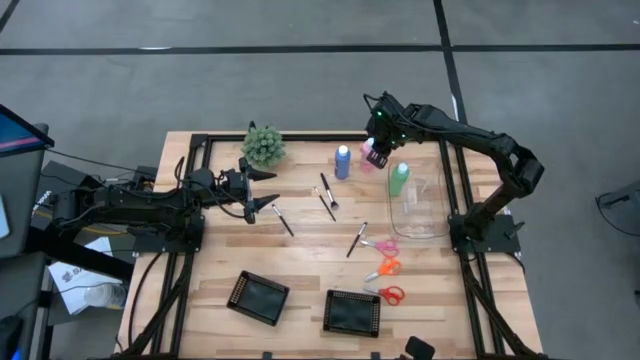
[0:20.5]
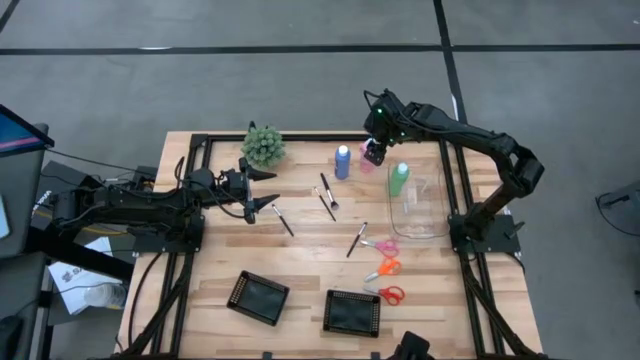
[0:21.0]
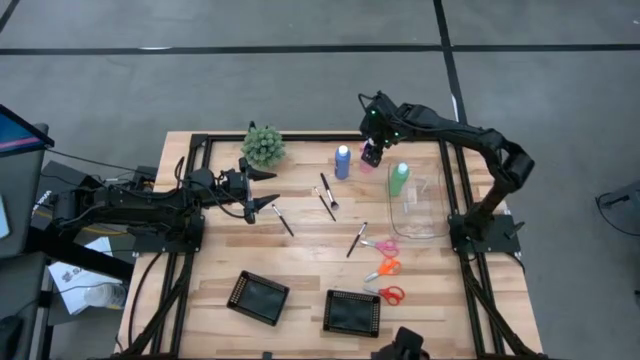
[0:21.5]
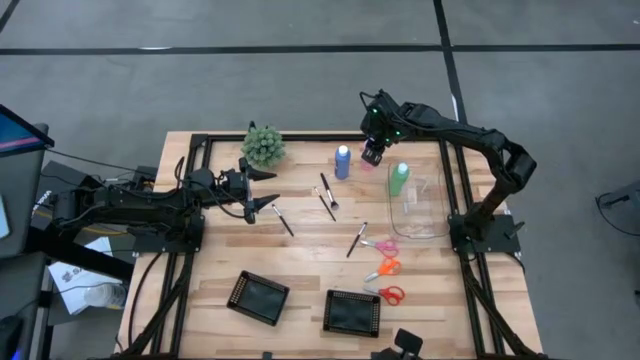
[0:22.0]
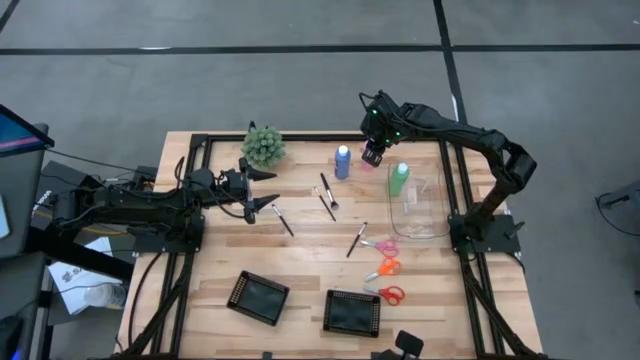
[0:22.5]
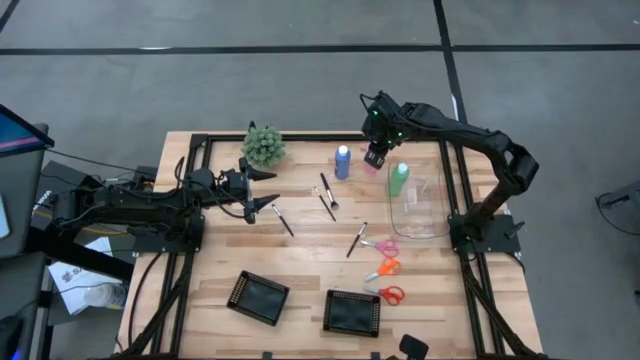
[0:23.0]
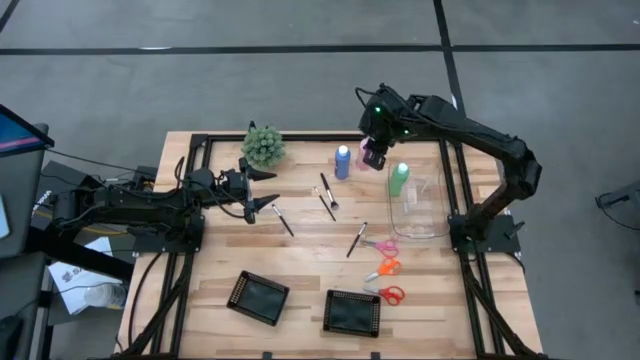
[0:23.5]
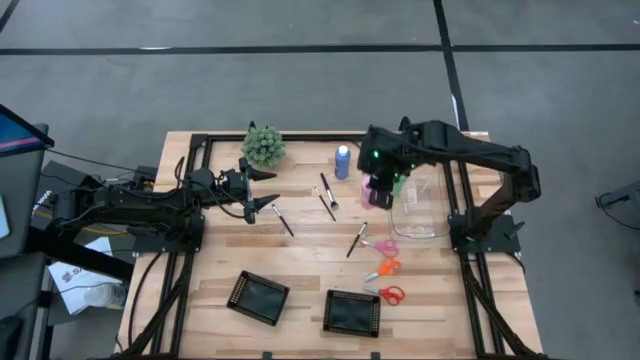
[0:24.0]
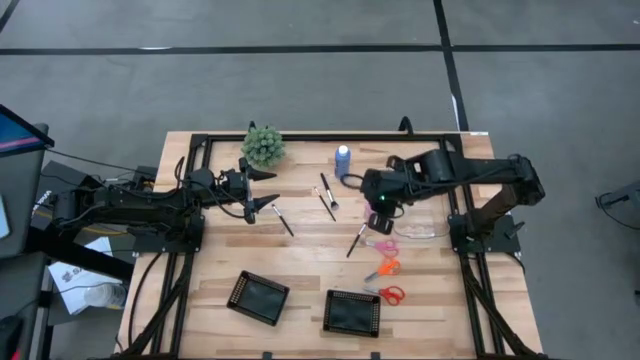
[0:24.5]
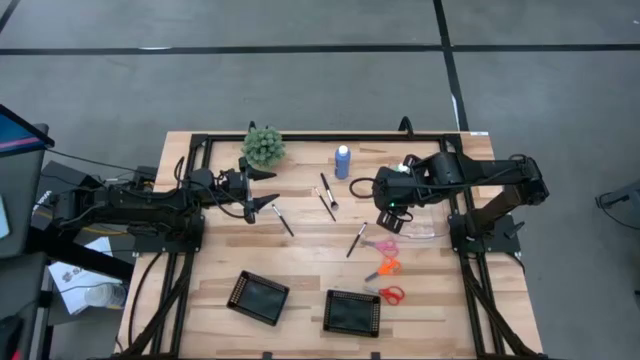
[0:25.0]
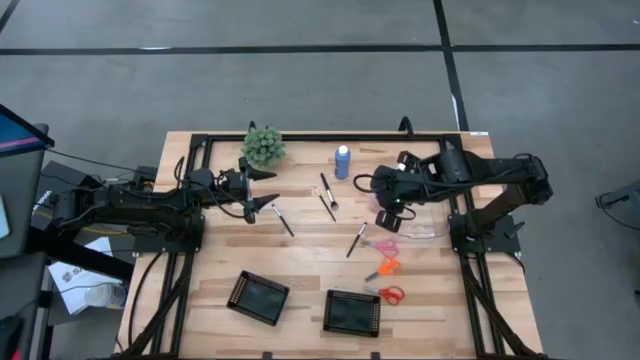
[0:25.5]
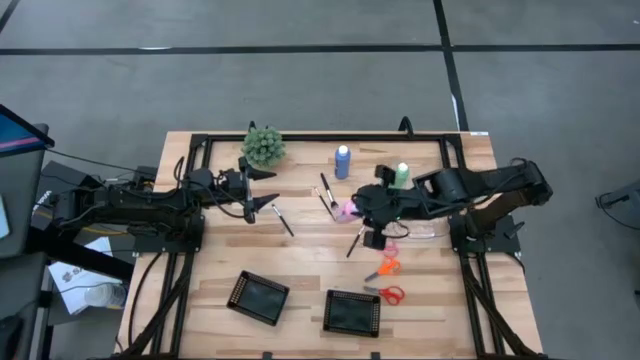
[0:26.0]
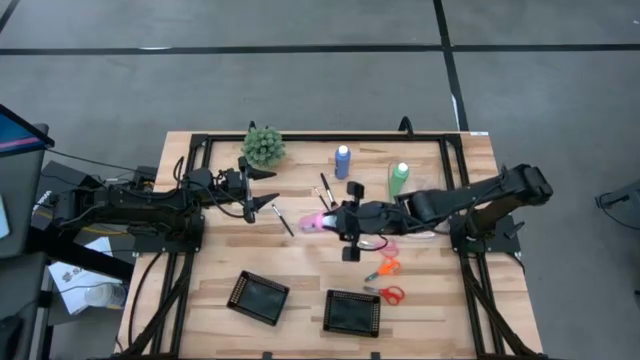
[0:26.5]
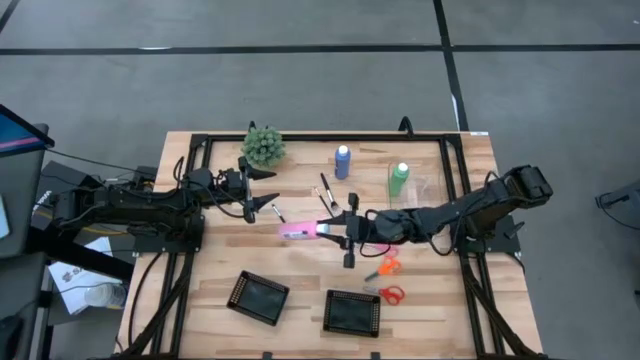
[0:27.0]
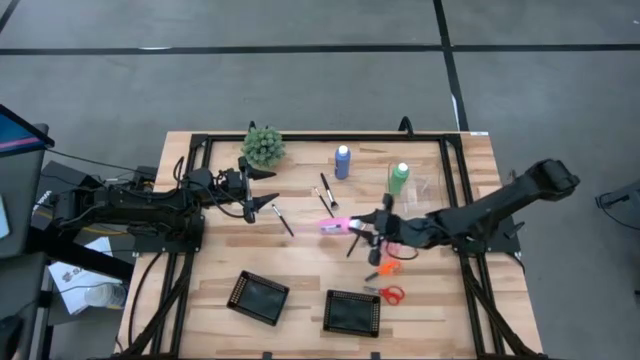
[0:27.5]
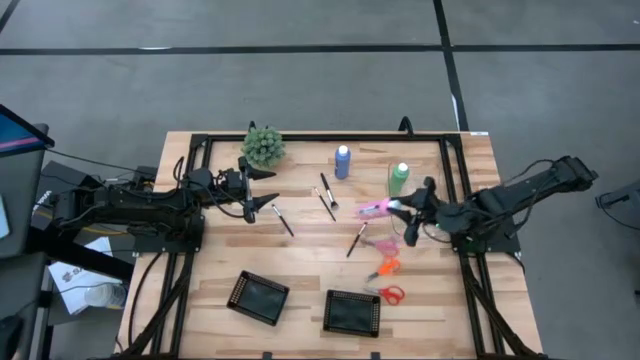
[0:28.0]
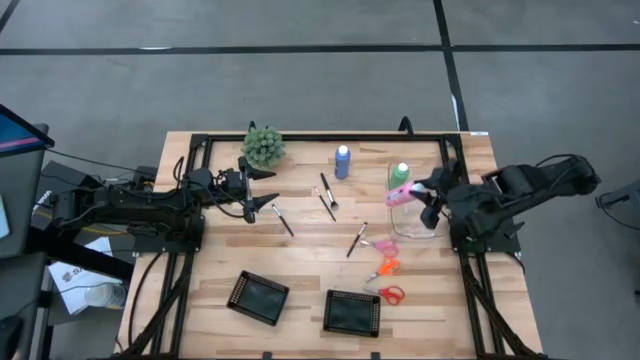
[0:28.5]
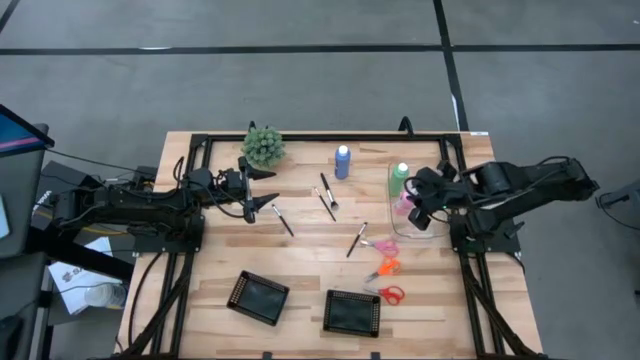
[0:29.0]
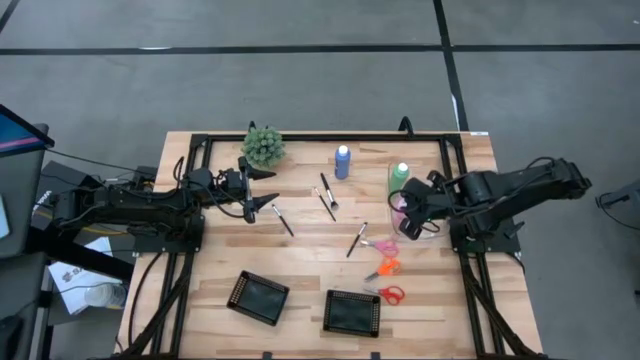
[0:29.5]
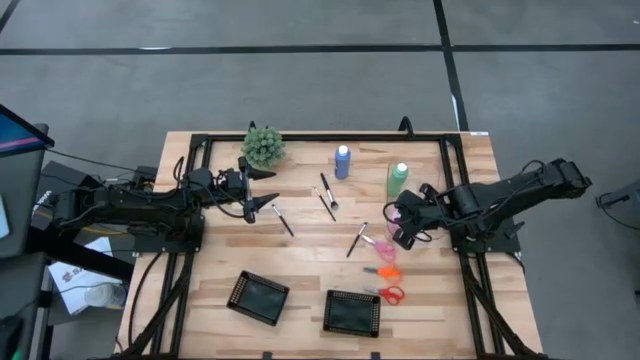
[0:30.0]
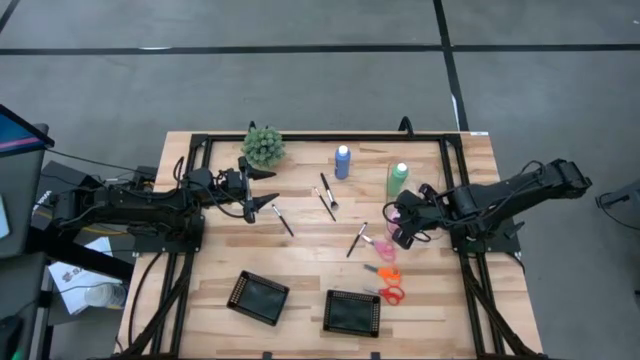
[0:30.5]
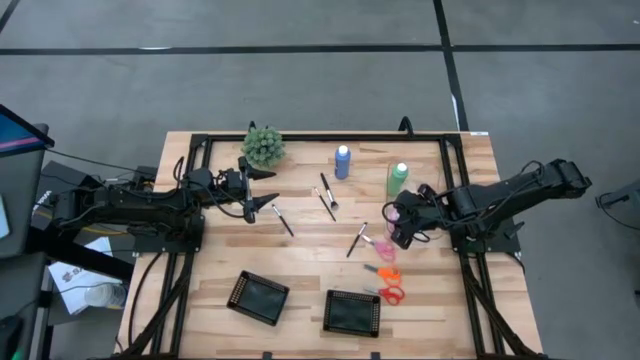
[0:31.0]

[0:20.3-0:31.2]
Task: Pick & Place Paint Supplies
Put the pink paint bottle into the transparent bin

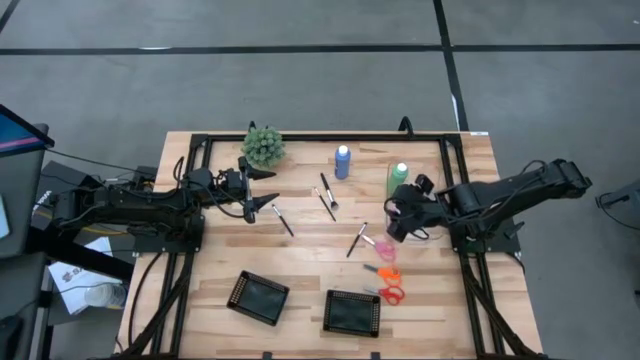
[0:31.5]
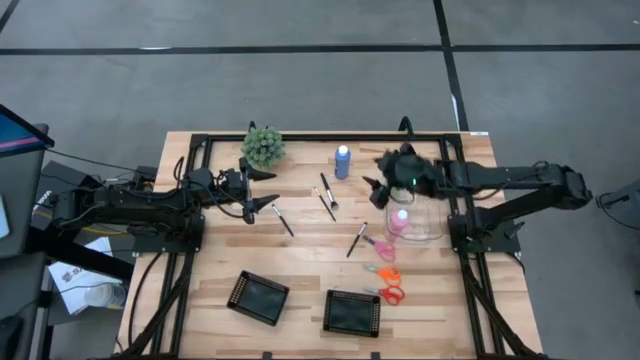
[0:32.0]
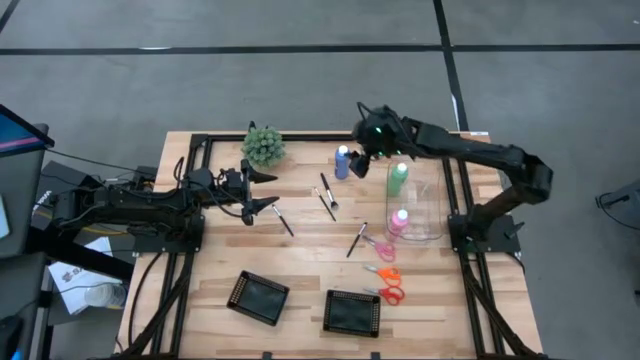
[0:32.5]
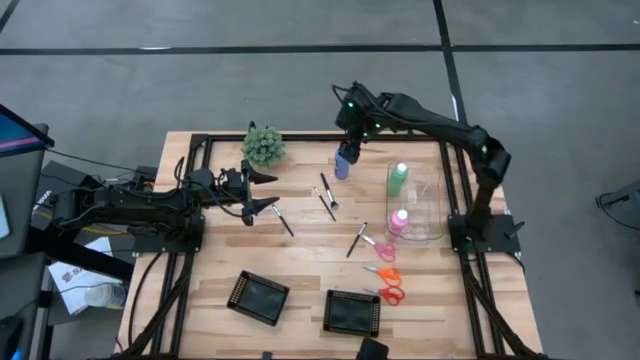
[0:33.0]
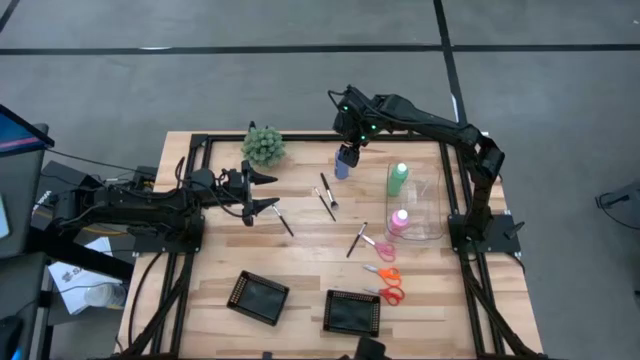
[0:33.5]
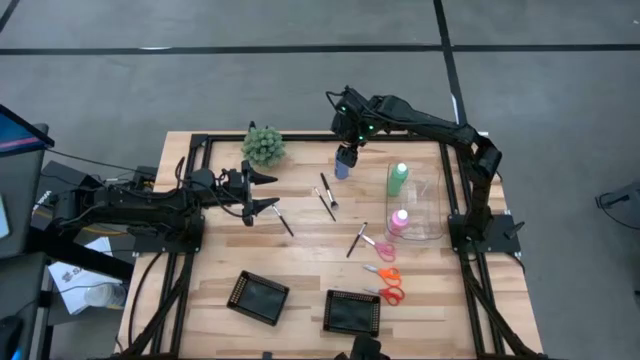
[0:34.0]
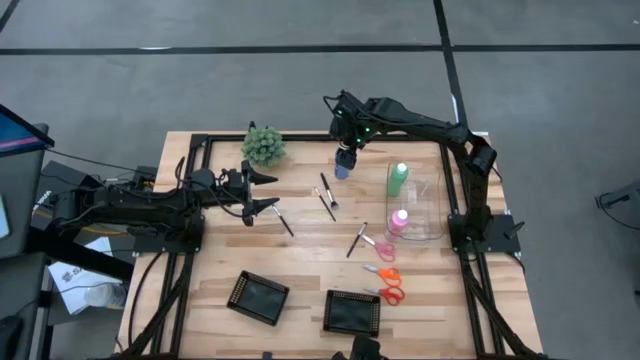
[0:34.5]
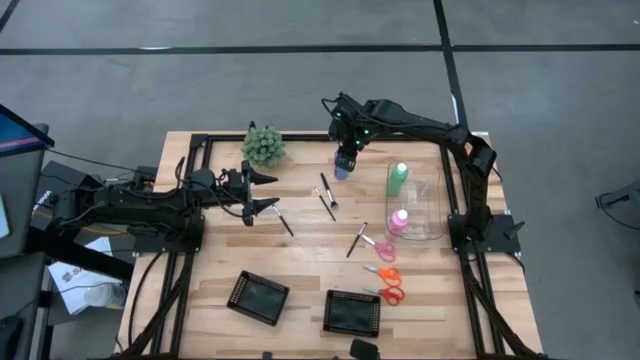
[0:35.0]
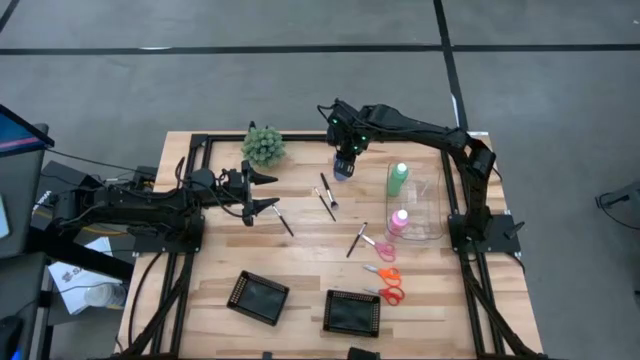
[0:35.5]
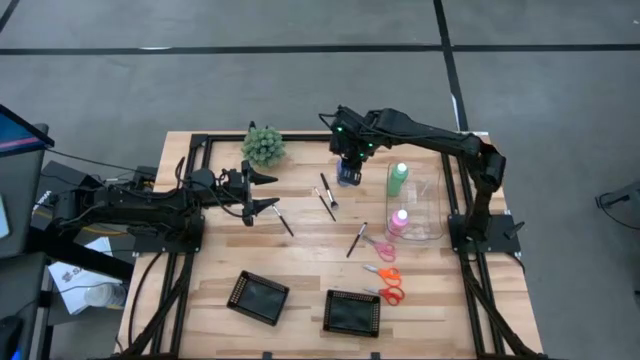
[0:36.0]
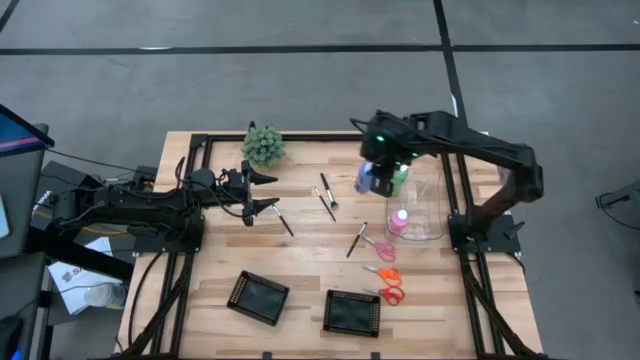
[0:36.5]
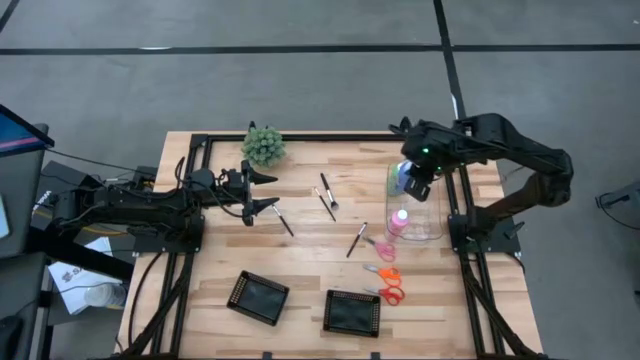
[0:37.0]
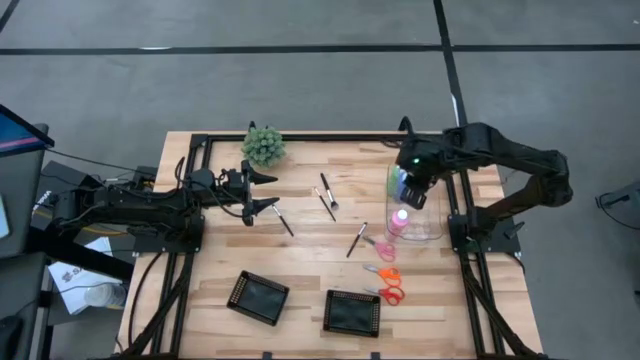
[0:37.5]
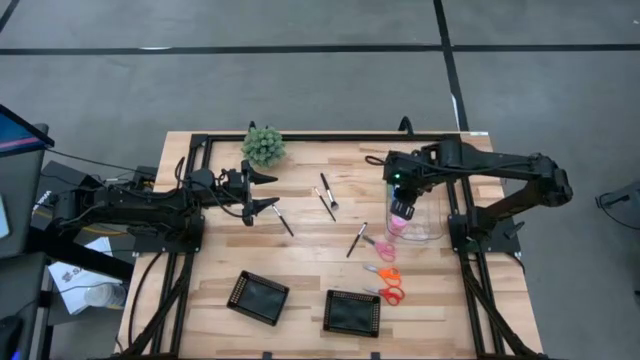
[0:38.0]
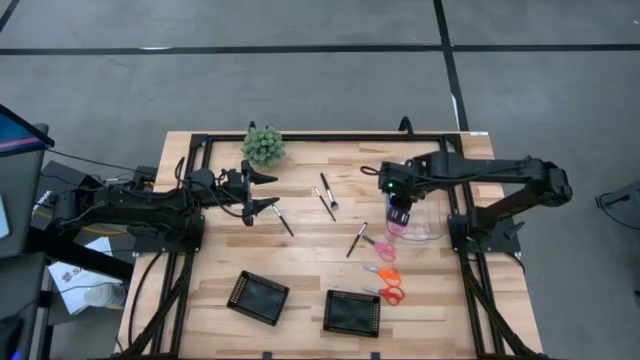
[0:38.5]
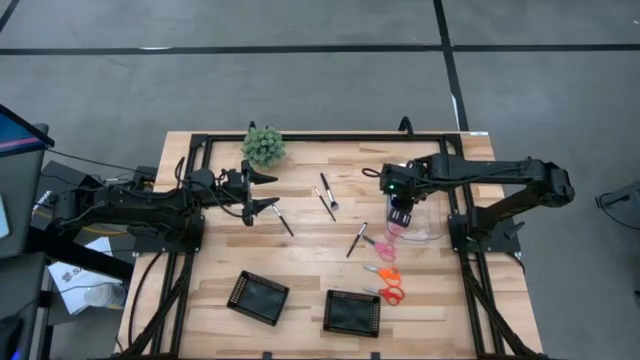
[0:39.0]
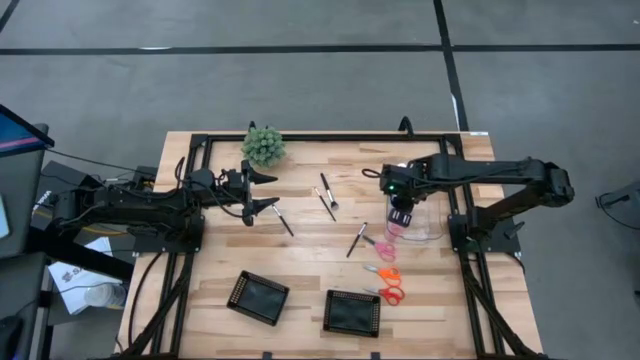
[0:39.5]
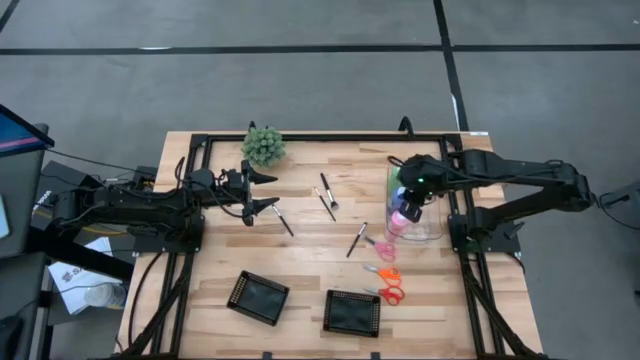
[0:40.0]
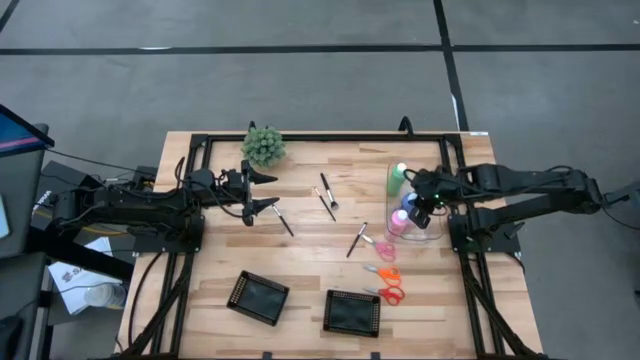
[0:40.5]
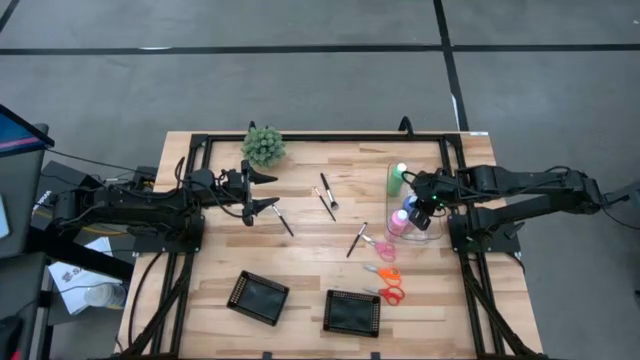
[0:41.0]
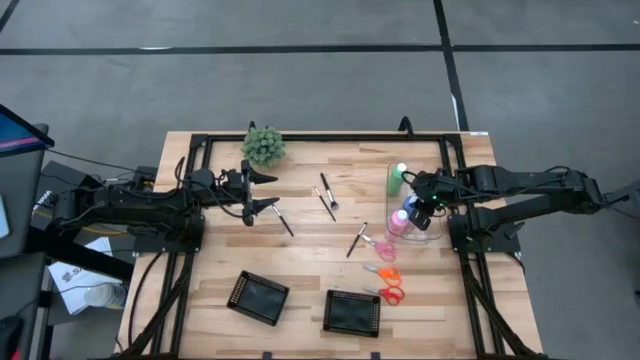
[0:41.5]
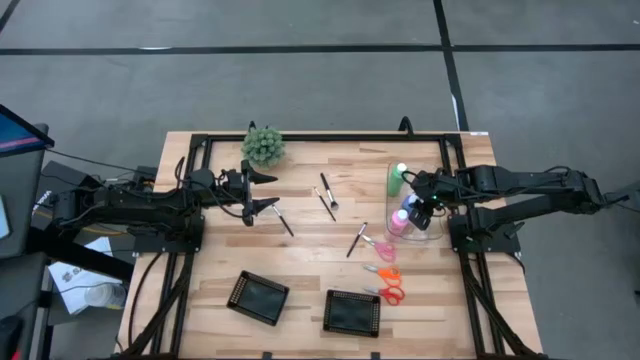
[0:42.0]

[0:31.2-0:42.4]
Put the blue paint bottle into the transparent bin
